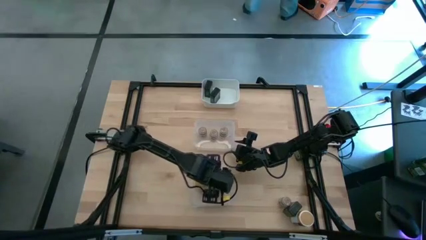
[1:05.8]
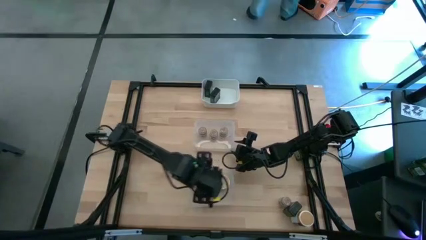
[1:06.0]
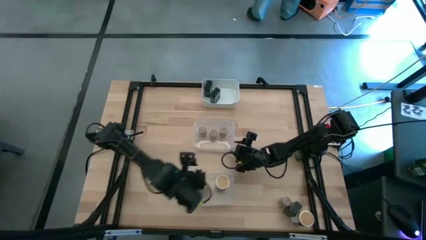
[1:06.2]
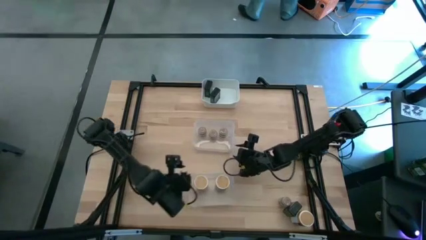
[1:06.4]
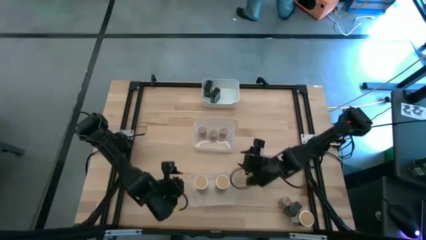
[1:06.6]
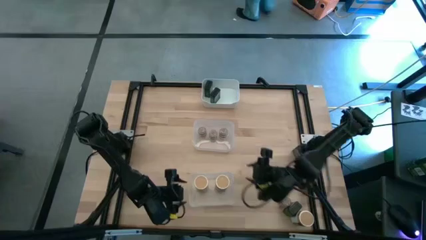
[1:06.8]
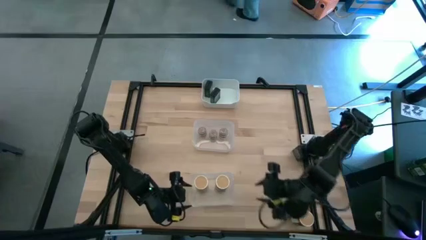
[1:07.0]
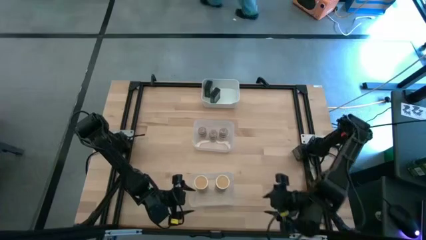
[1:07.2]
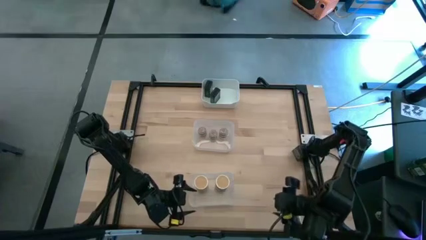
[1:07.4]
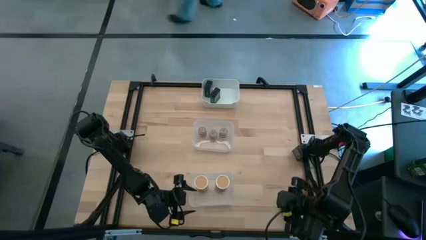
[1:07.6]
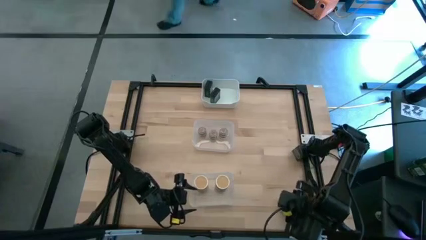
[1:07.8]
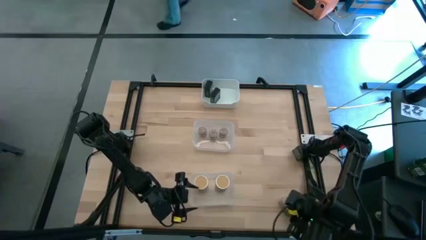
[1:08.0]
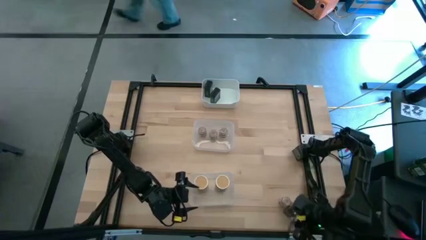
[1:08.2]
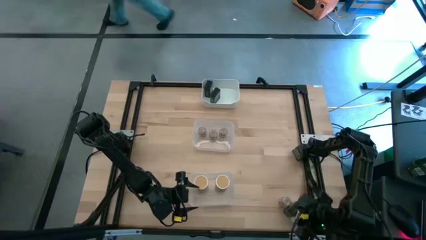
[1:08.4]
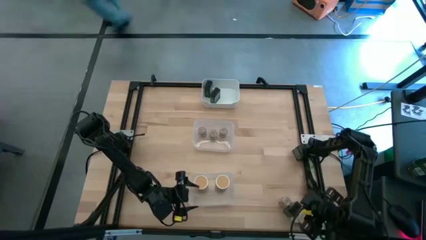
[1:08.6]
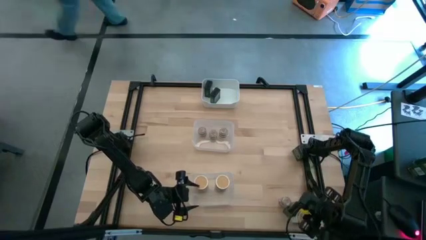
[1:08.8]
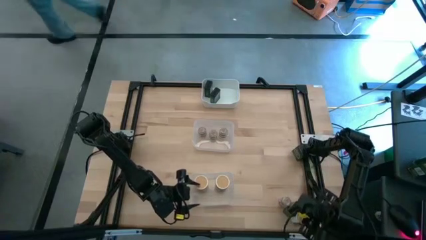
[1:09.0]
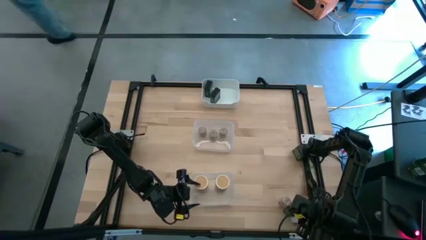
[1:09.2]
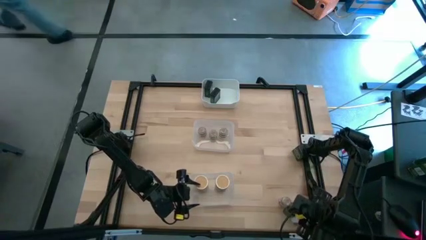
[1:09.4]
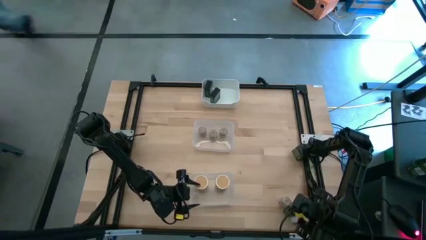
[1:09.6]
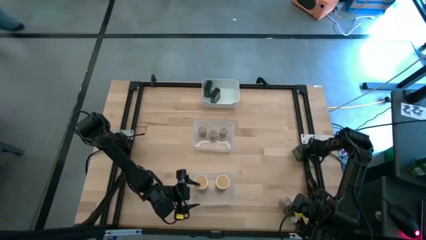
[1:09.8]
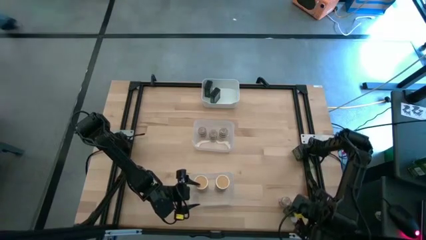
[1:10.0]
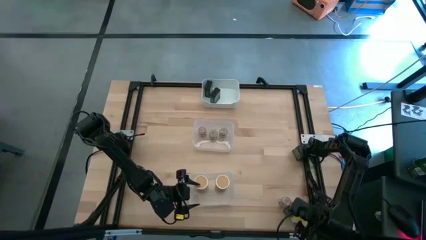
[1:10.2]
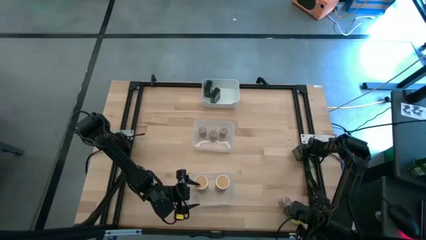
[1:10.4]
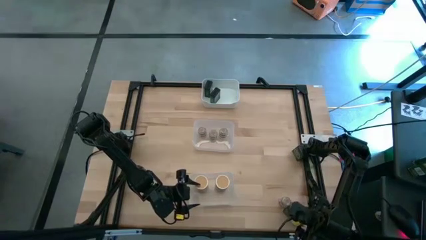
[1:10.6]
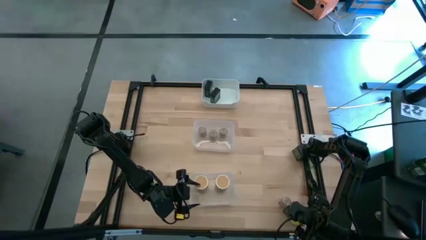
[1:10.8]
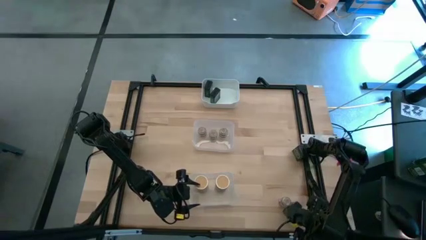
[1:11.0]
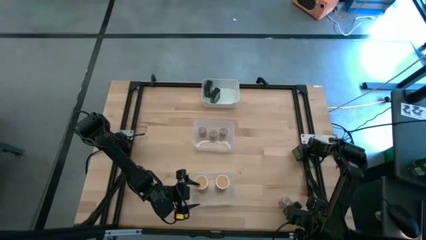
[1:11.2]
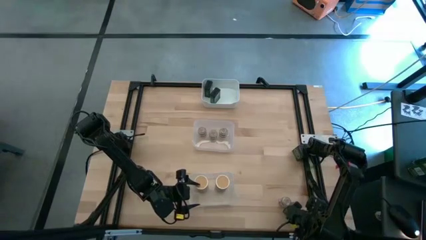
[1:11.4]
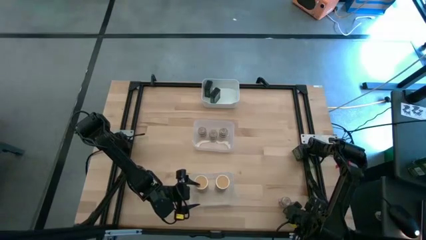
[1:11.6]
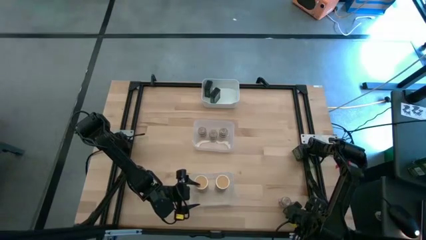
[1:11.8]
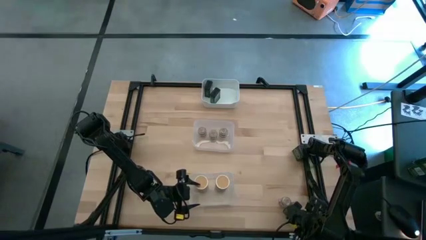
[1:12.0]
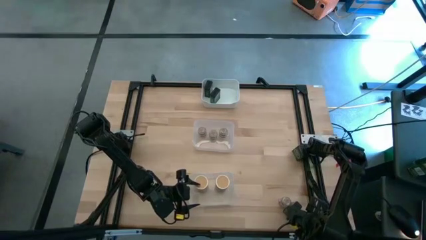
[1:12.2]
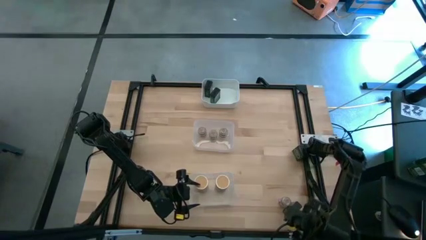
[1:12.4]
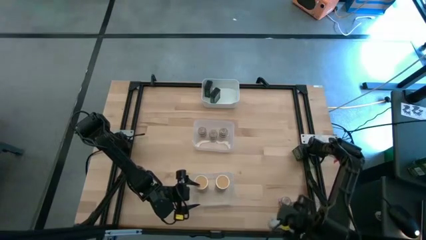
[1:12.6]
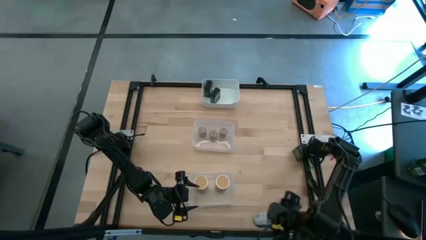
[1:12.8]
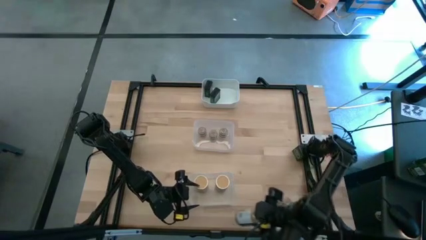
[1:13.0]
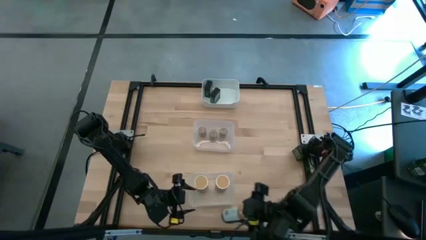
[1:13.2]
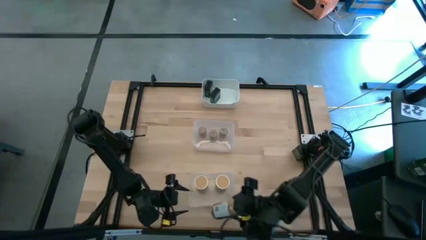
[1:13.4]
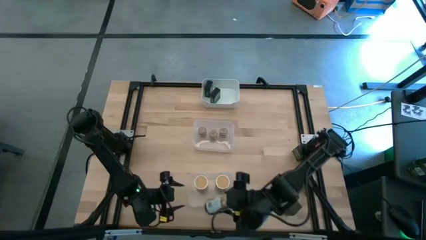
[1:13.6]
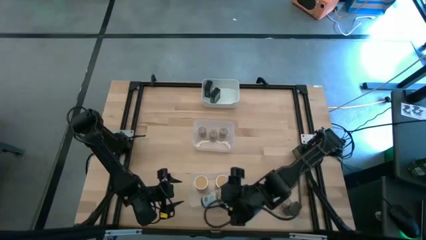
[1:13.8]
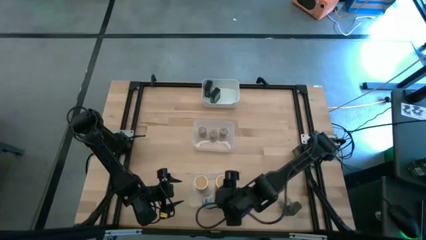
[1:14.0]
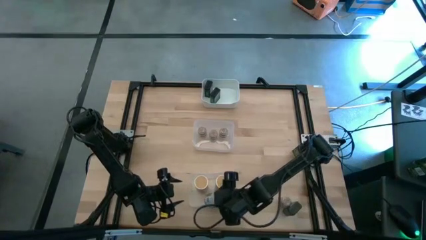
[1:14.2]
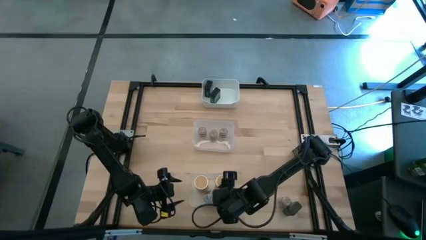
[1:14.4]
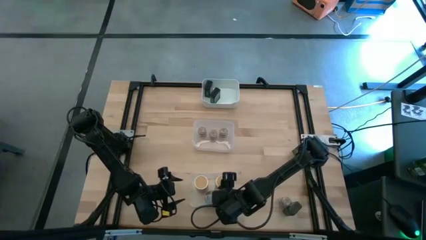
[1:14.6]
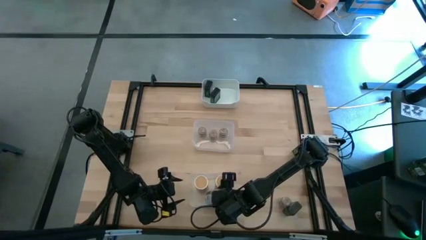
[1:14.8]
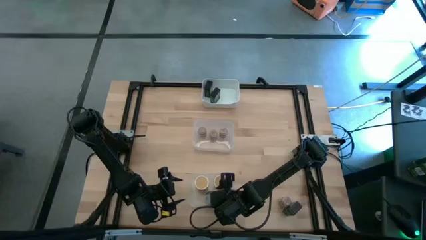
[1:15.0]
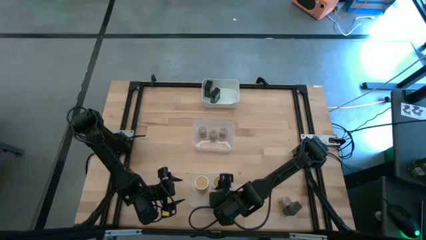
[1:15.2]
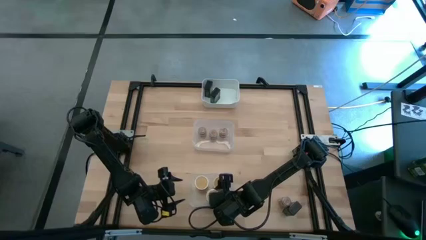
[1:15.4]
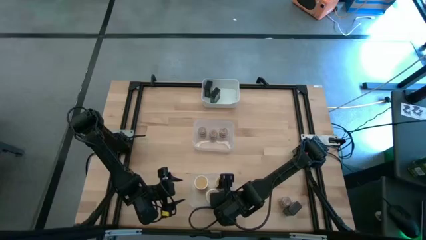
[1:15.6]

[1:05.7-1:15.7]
Task: Sort spices by type
Put the gold seasoning bottle into the bottom transparent bin

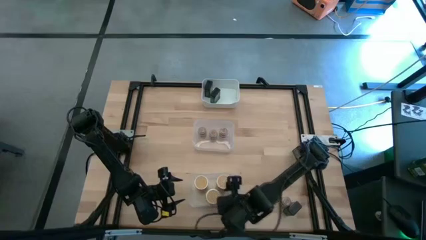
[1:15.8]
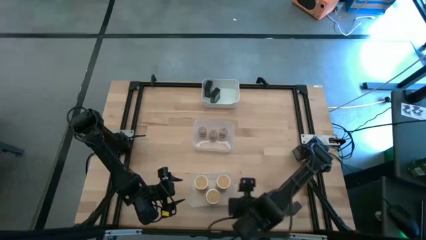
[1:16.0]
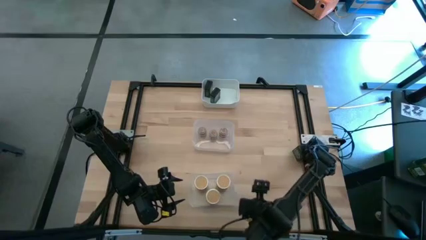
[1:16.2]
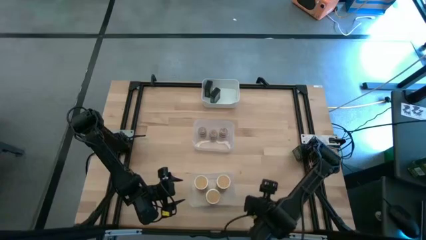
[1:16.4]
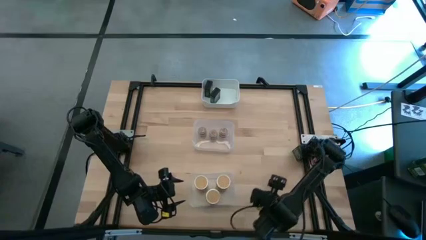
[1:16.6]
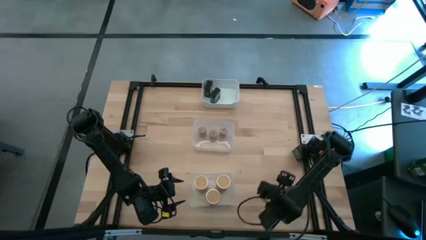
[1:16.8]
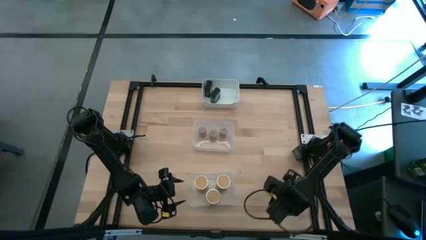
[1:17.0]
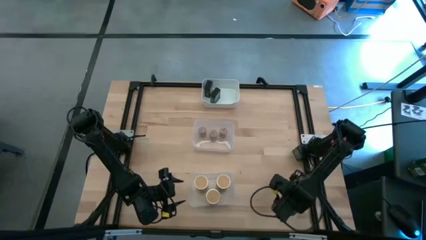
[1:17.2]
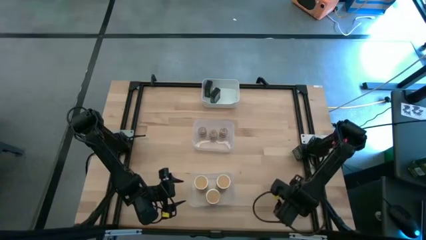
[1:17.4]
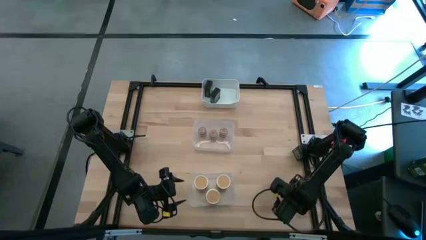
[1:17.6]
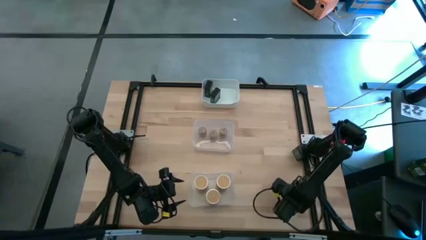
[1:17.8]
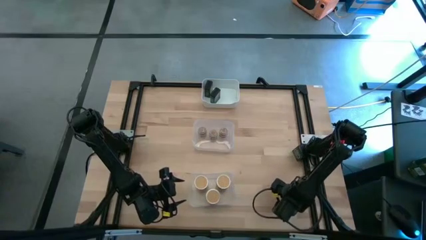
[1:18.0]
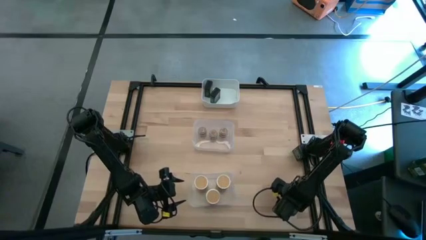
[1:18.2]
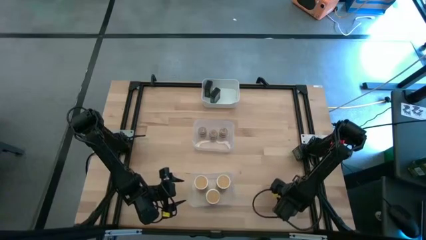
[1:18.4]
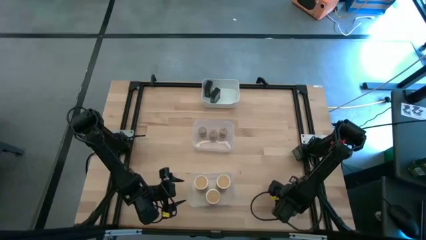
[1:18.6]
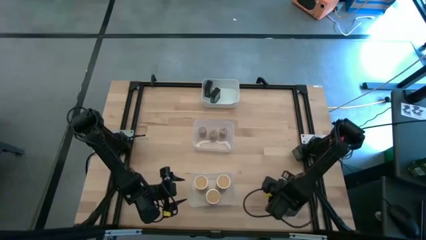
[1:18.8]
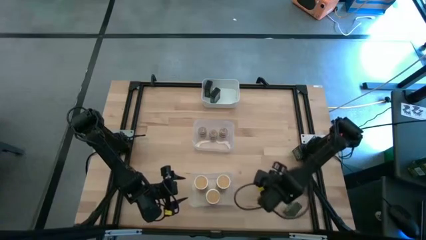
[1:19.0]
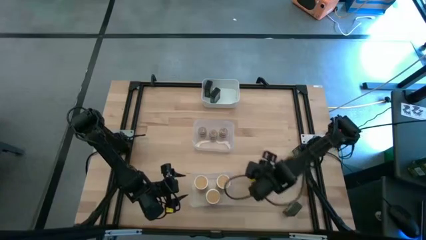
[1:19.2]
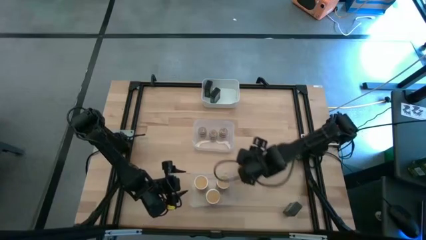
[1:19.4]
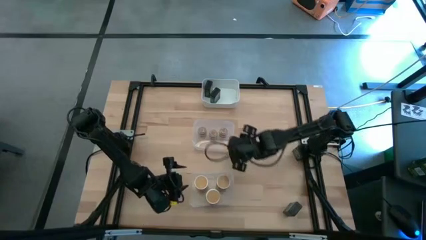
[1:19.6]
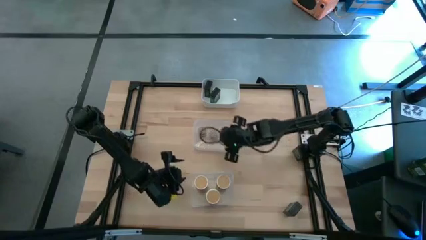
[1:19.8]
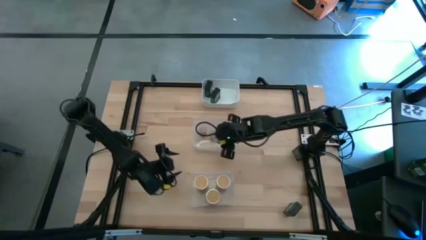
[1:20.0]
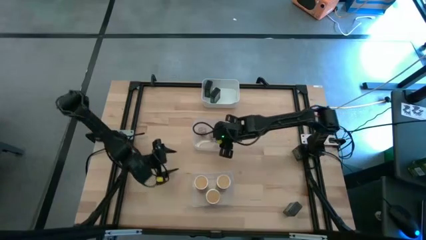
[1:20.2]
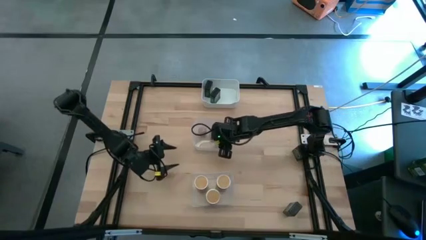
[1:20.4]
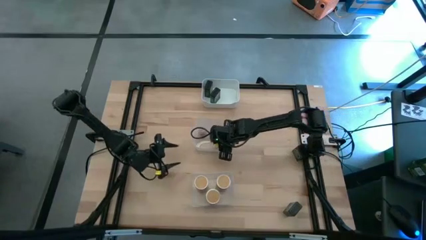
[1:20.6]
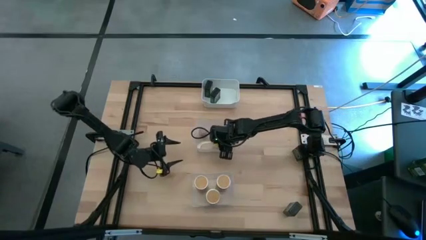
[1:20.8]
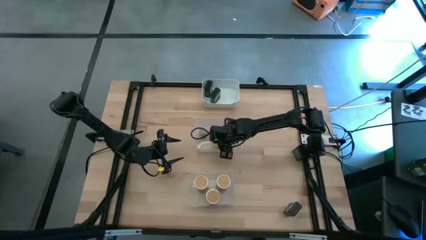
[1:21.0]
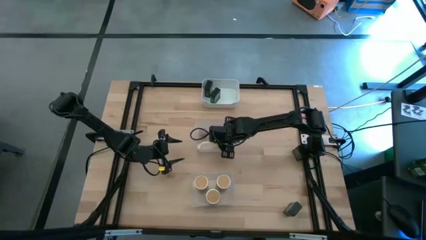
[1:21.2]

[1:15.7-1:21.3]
Put the small brown seasoning bottle into the top transparent bin
